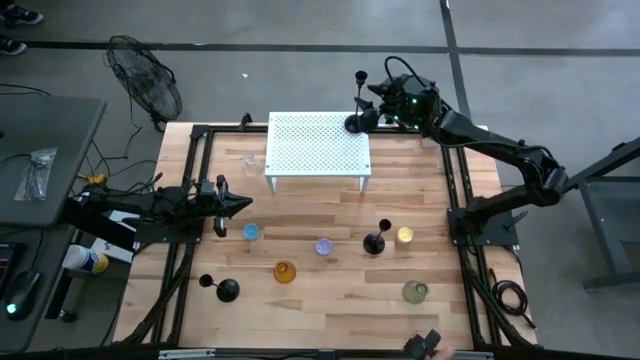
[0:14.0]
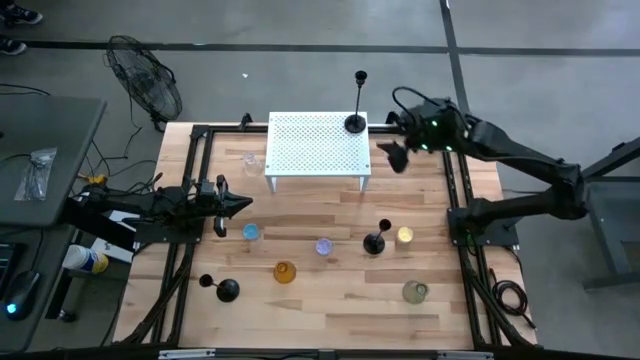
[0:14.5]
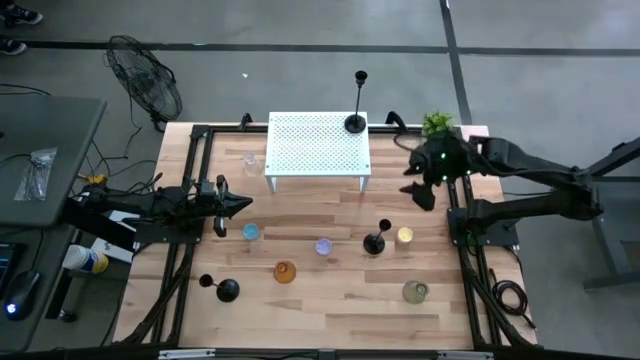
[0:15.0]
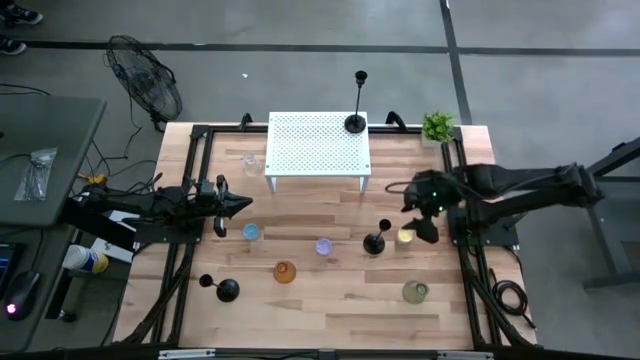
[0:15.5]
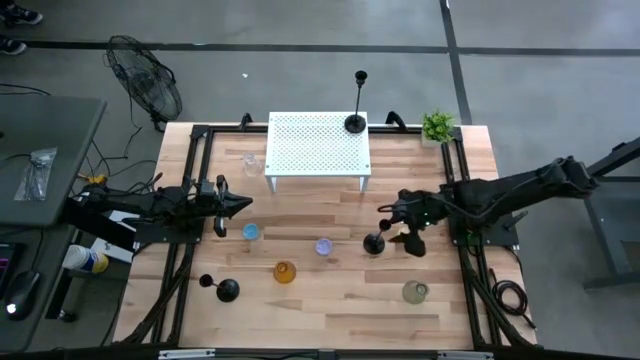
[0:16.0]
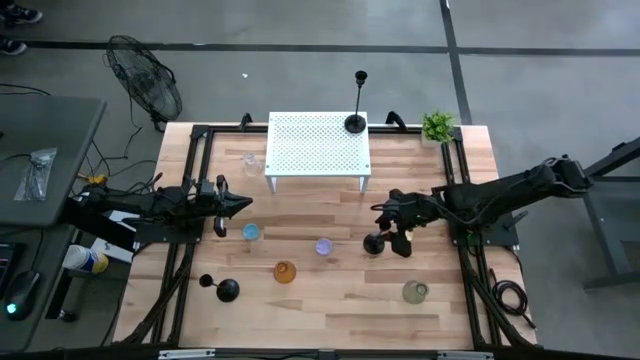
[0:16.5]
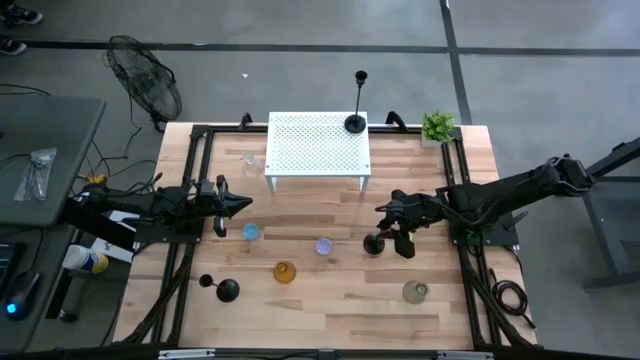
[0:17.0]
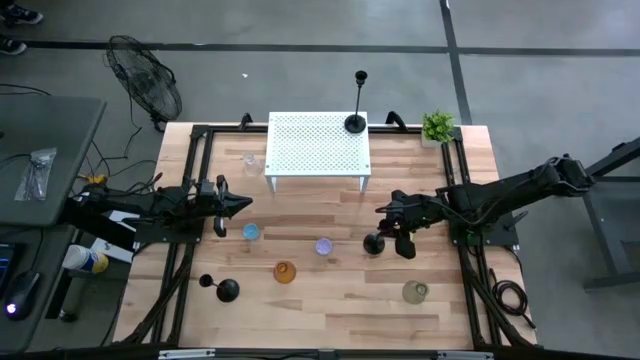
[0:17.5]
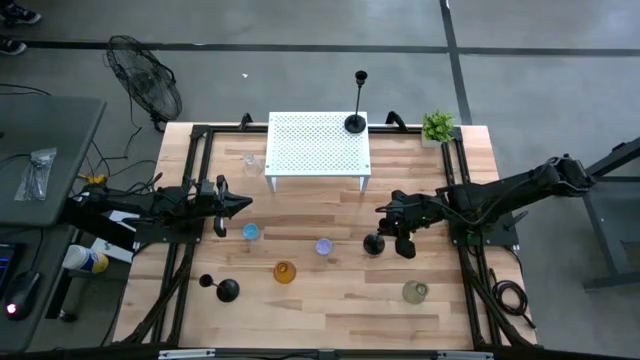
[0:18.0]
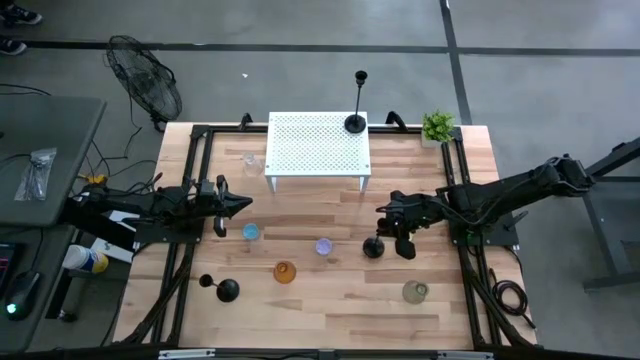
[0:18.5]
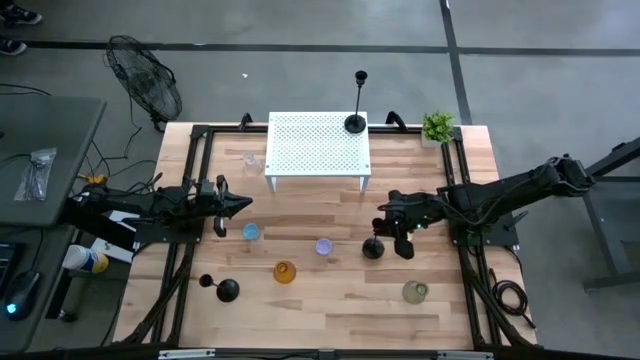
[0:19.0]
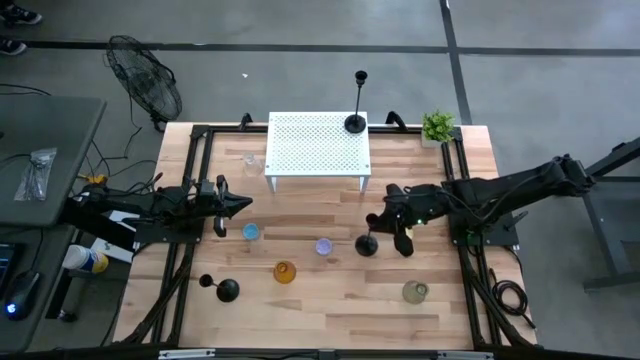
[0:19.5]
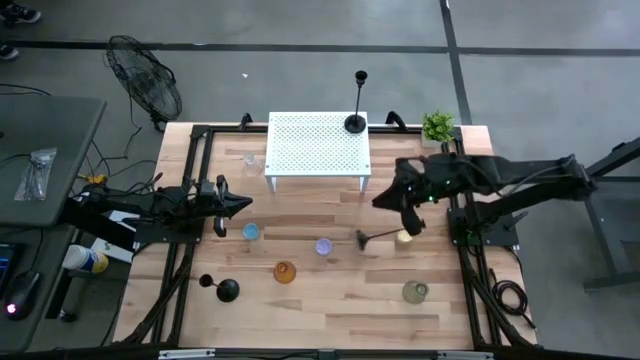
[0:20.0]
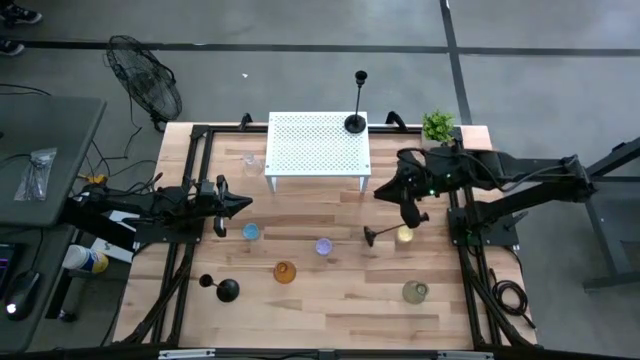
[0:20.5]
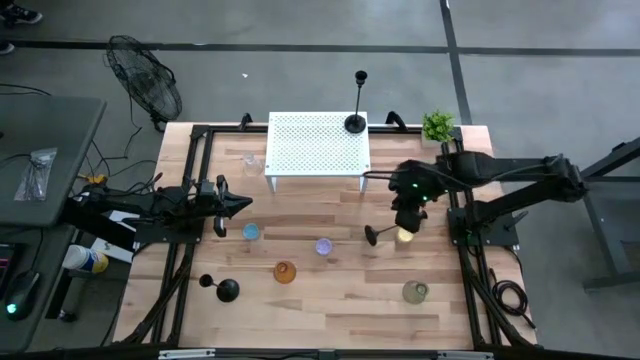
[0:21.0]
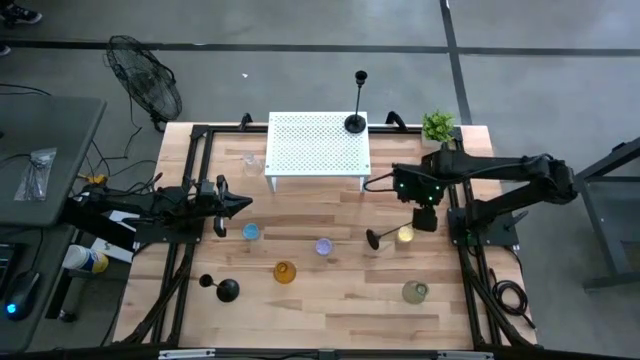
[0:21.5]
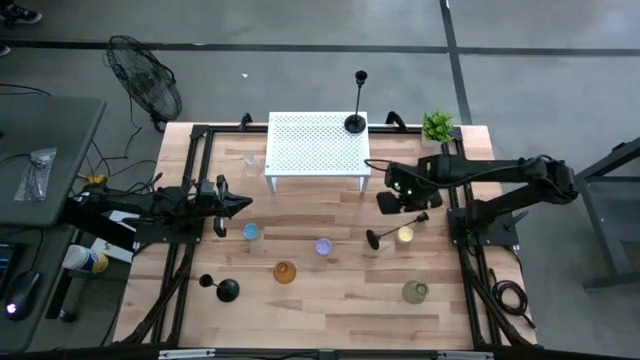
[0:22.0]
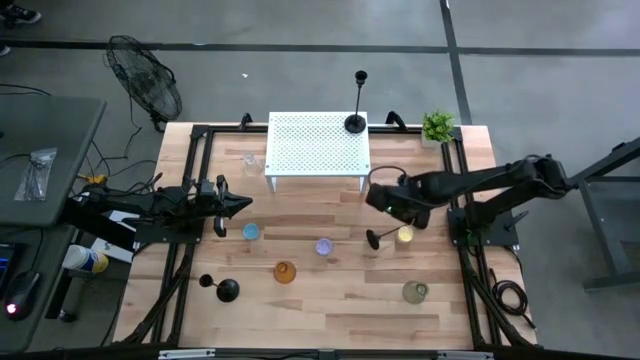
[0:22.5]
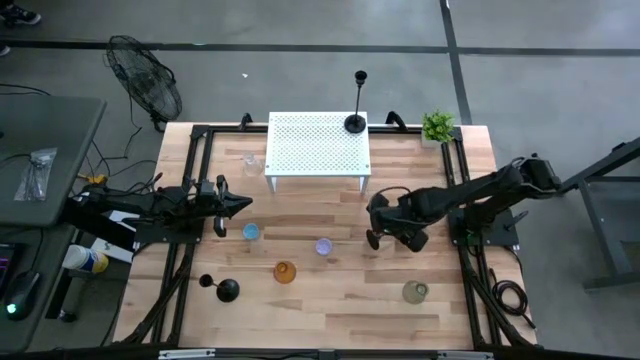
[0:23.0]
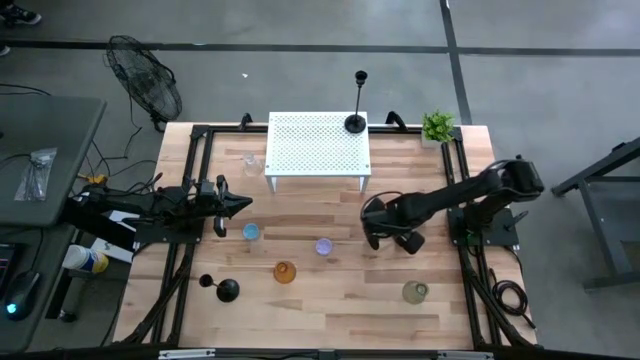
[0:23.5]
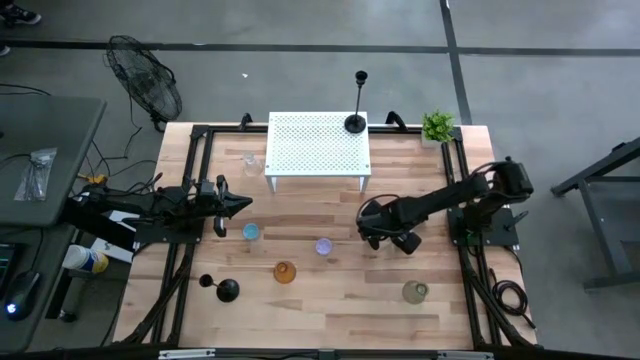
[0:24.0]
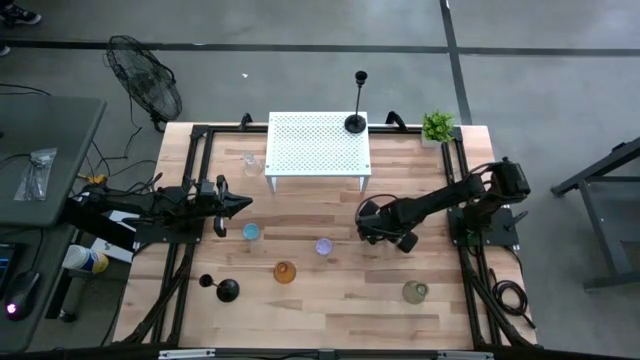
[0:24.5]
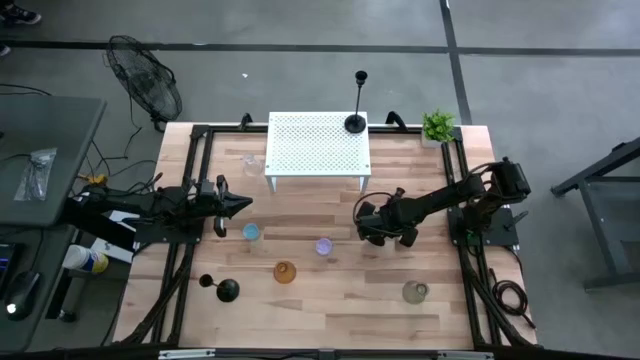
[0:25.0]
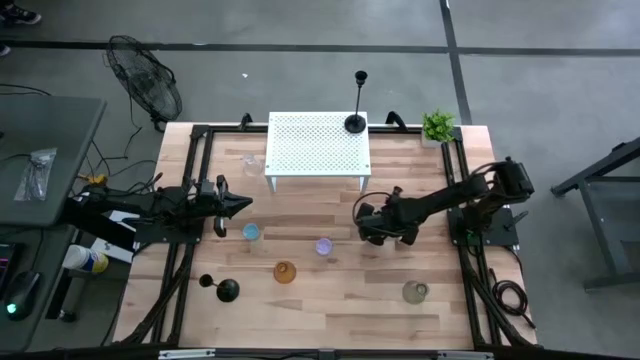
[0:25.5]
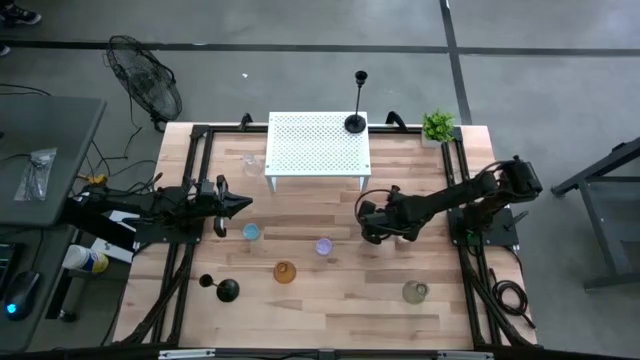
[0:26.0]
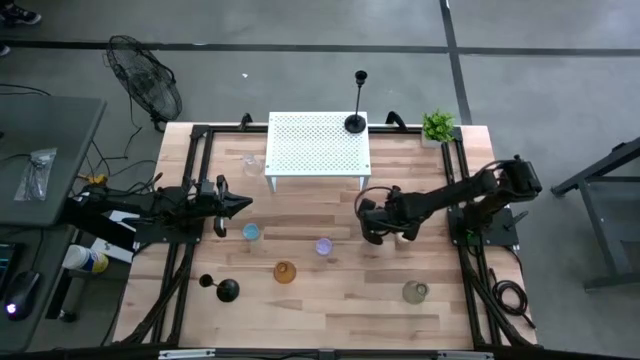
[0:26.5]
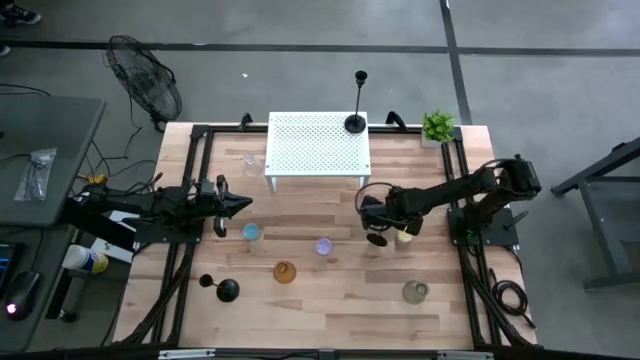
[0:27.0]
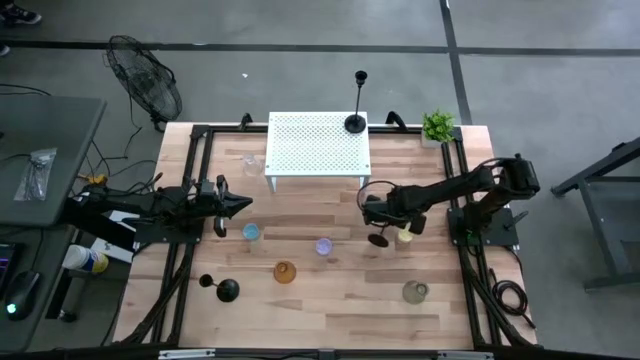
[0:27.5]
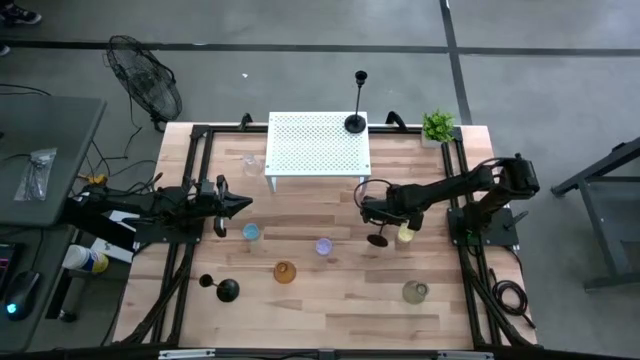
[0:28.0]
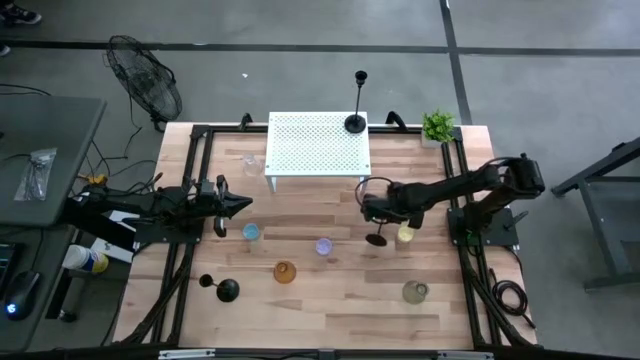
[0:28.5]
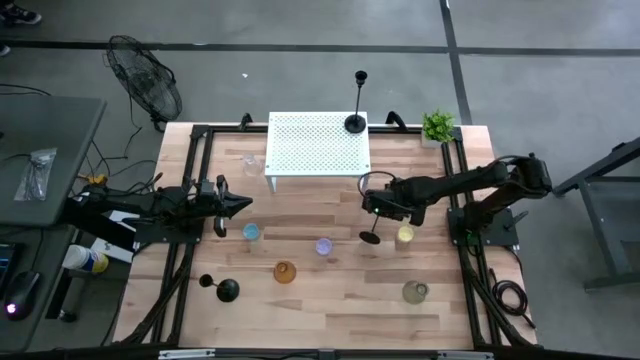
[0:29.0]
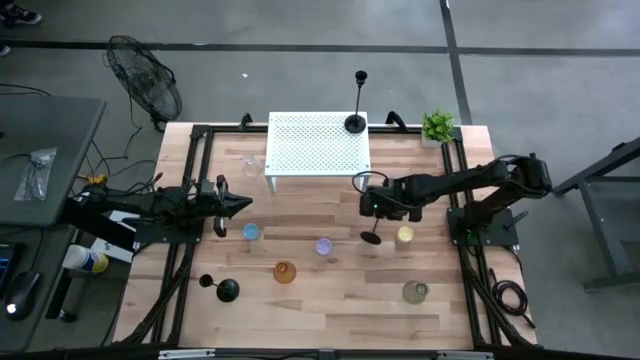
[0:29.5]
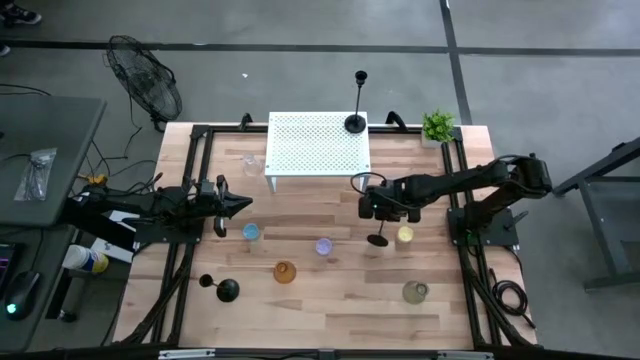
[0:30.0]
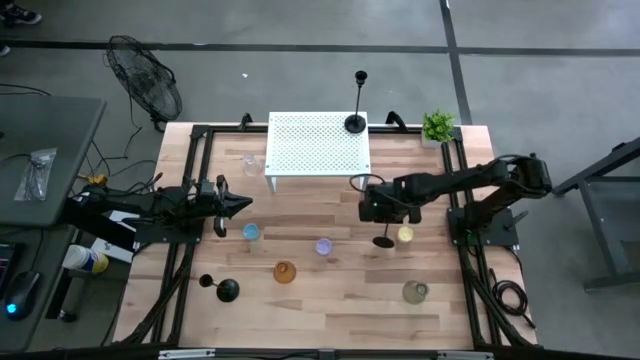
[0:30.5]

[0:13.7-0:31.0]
Task: Pick & Place candle stick holders
Put the top black candle holder on the shelf

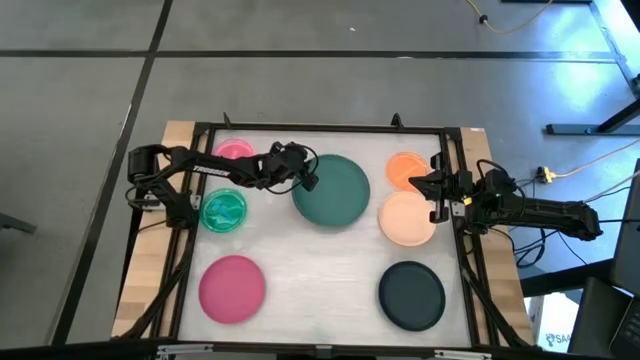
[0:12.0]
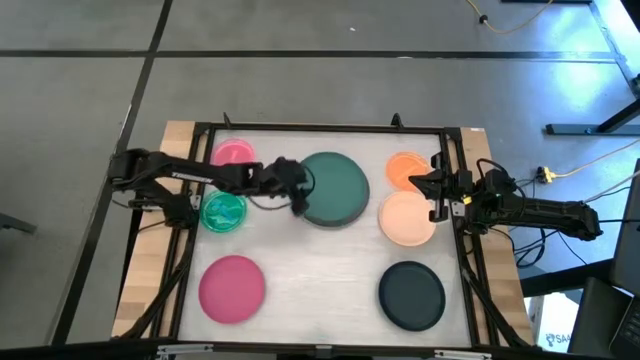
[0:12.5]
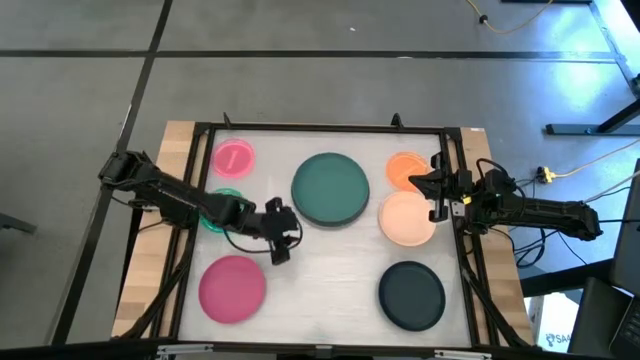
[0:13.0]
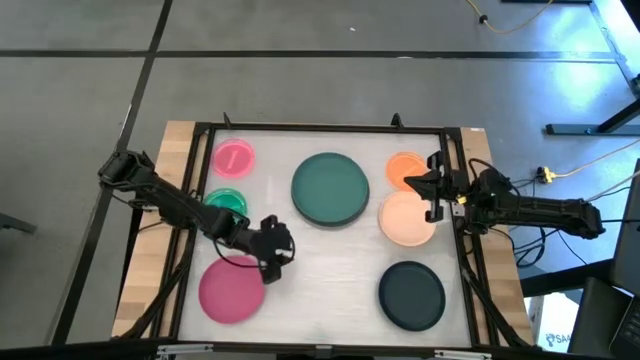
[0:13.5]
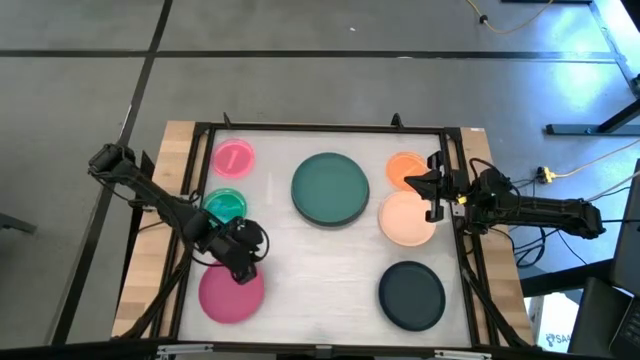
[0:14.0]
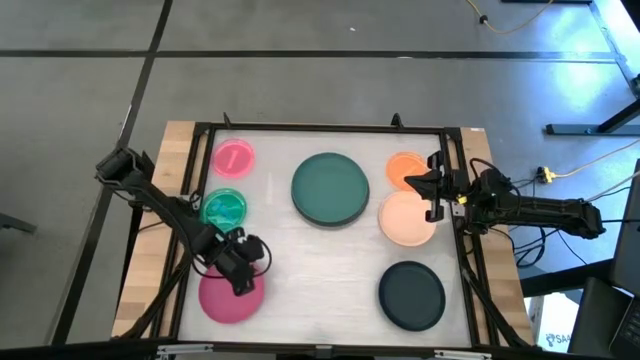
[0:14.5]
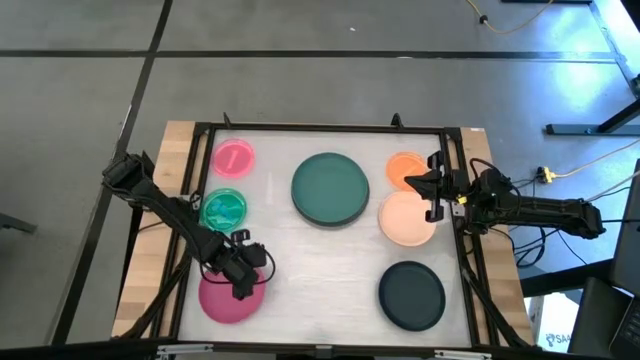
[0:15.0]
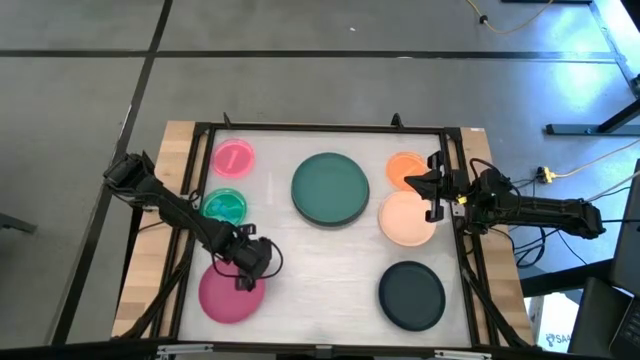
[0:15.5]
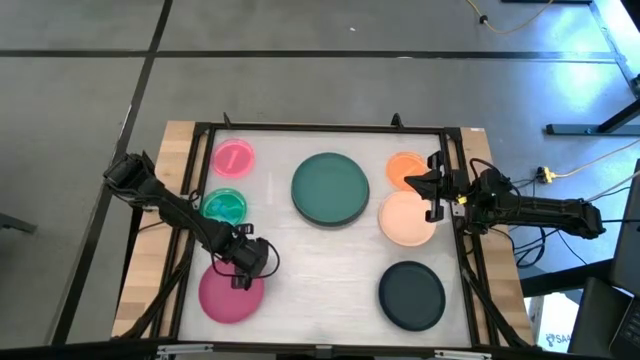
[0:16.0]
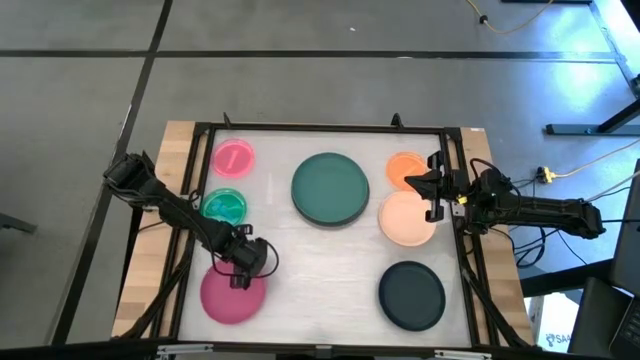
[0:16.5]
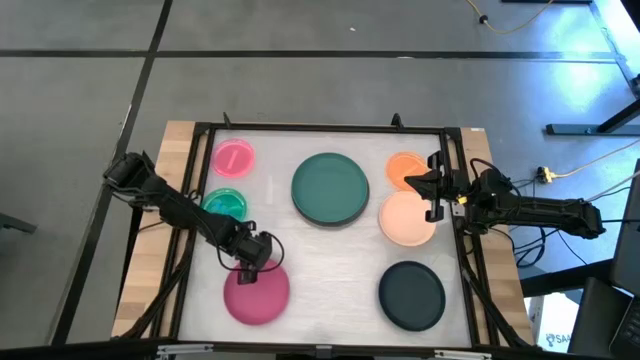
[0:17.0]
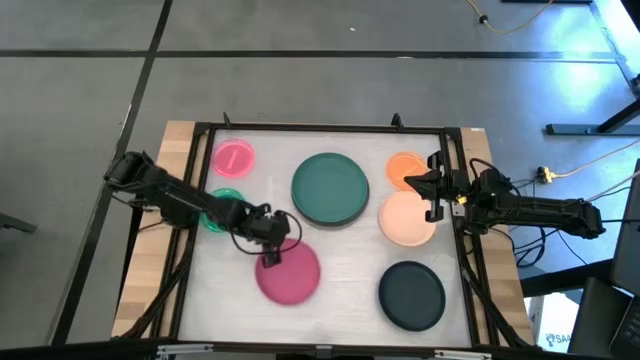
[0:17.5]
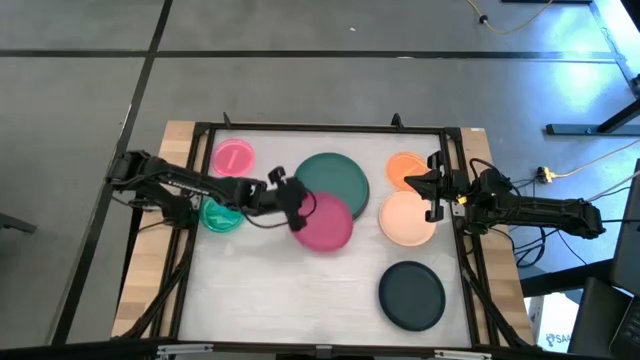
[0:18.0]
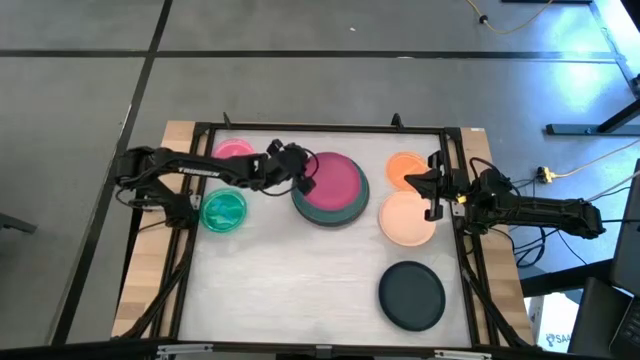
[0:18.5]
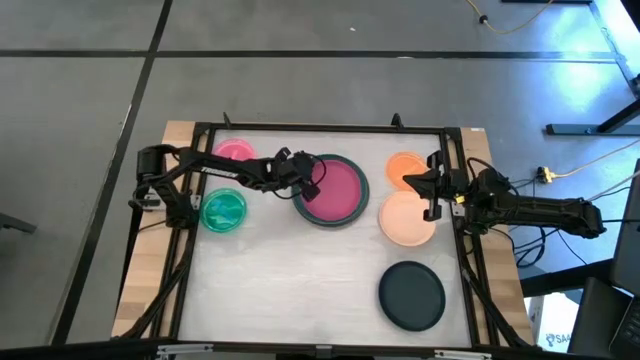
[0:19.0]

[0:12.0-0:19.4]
Task: Stack plastic plates
Stack the pink plate on the green plate
